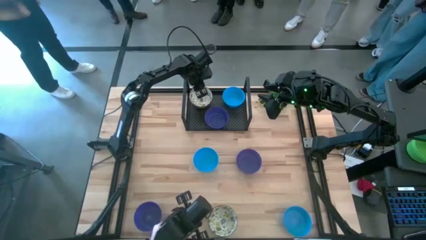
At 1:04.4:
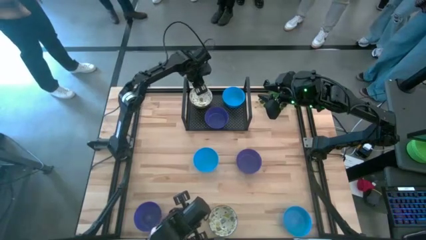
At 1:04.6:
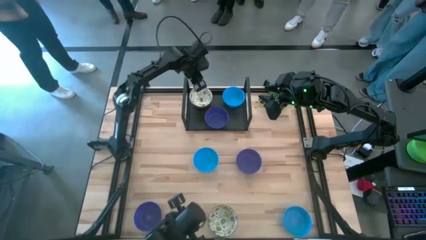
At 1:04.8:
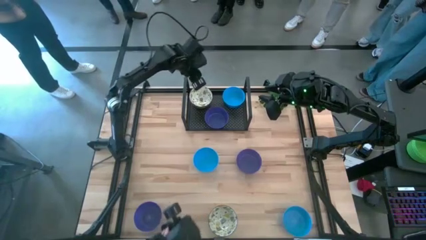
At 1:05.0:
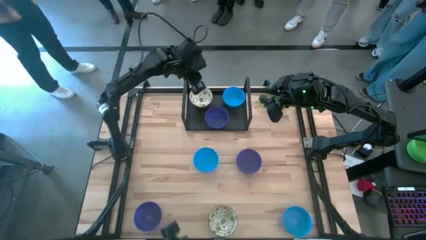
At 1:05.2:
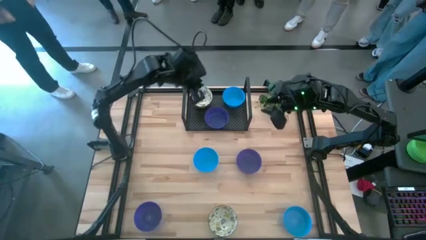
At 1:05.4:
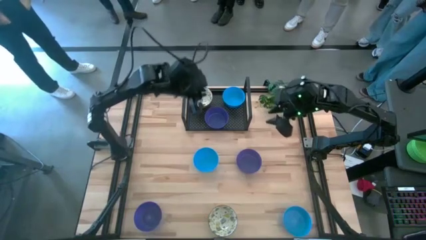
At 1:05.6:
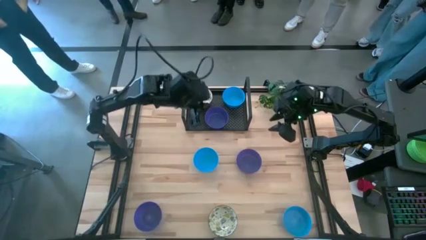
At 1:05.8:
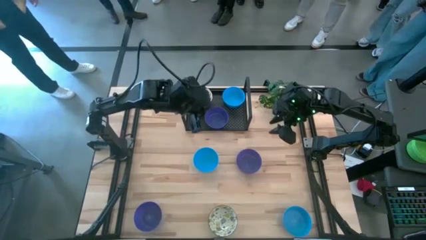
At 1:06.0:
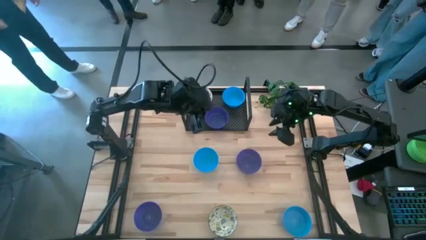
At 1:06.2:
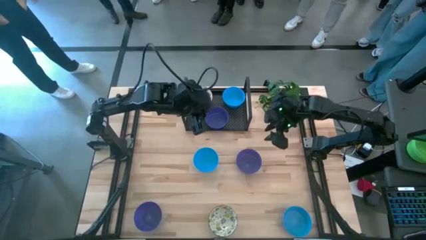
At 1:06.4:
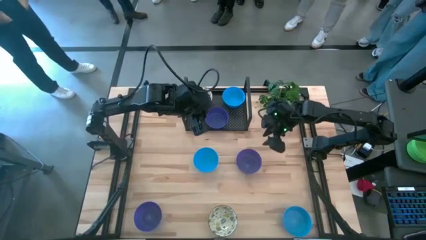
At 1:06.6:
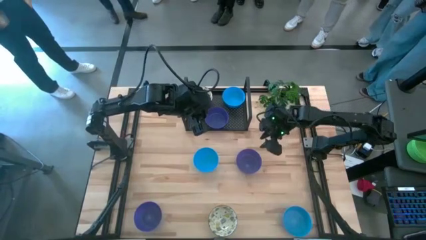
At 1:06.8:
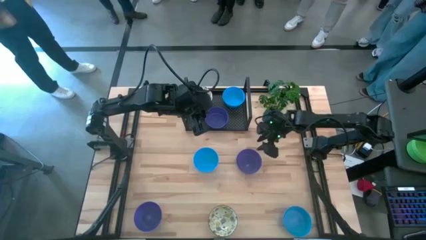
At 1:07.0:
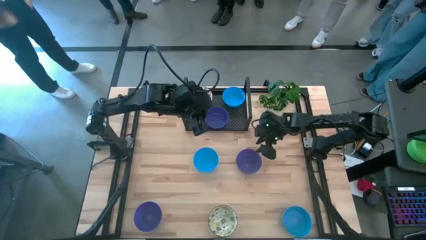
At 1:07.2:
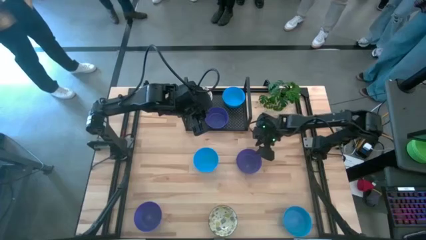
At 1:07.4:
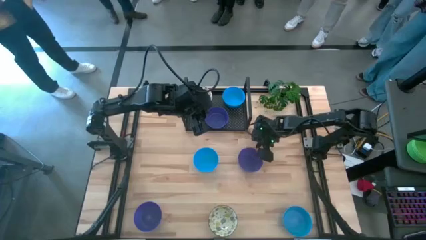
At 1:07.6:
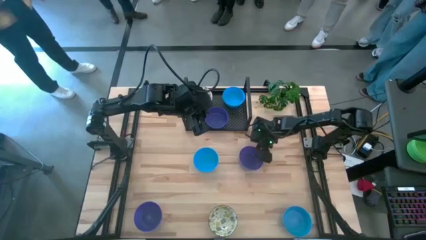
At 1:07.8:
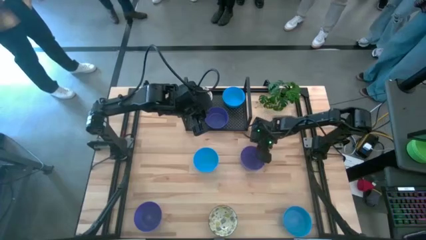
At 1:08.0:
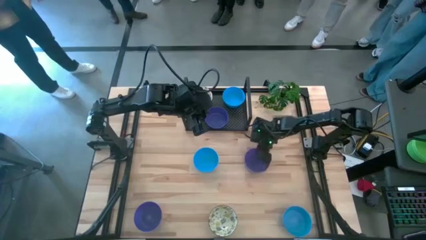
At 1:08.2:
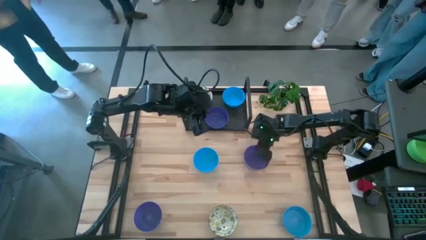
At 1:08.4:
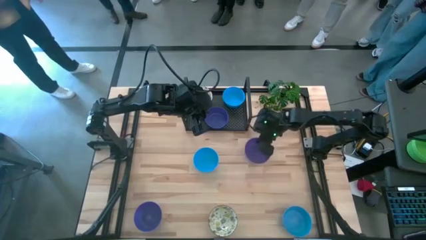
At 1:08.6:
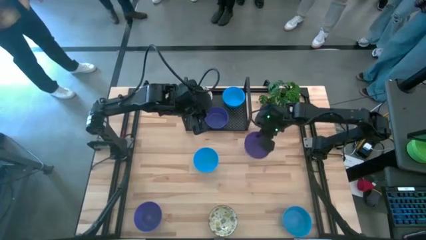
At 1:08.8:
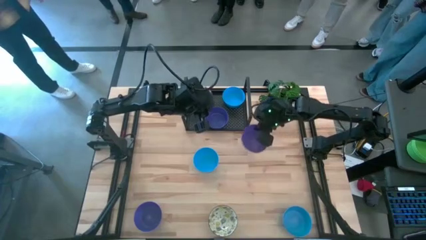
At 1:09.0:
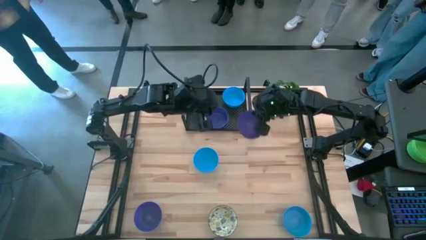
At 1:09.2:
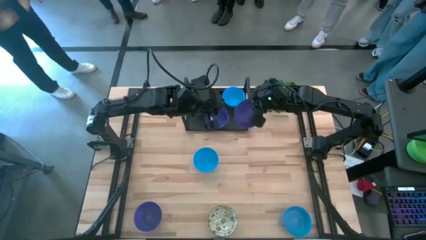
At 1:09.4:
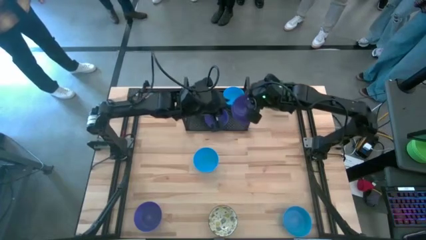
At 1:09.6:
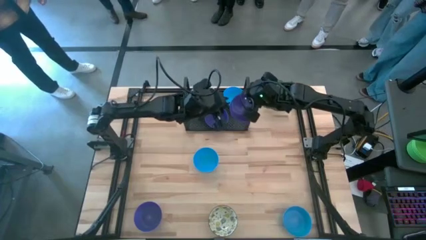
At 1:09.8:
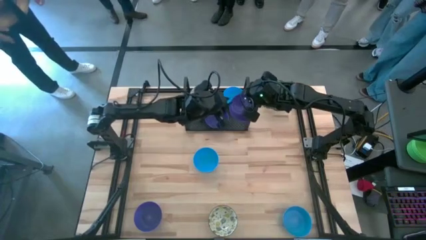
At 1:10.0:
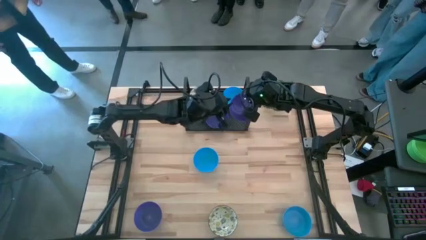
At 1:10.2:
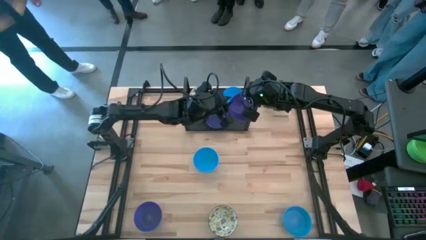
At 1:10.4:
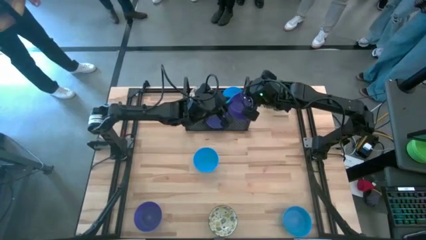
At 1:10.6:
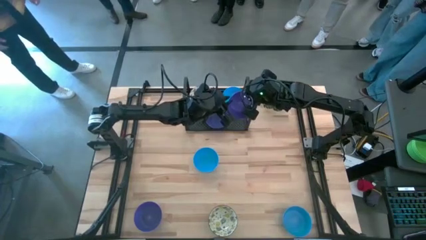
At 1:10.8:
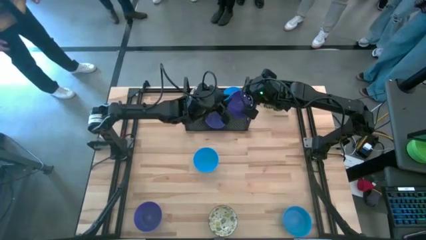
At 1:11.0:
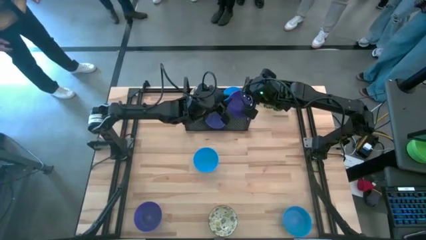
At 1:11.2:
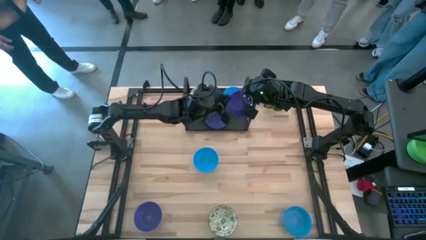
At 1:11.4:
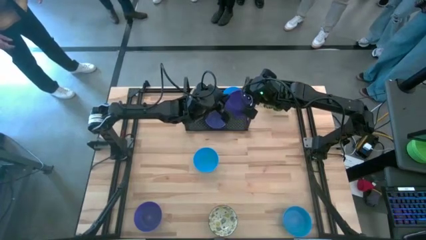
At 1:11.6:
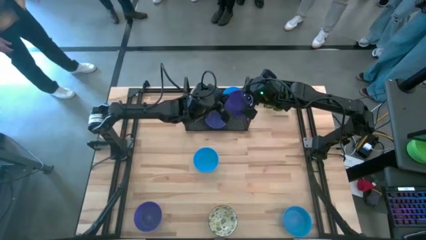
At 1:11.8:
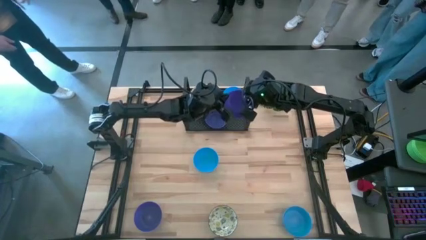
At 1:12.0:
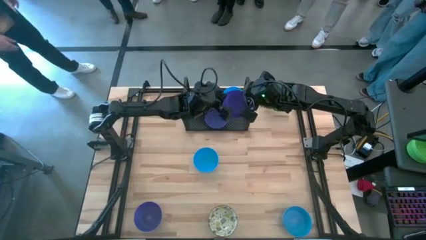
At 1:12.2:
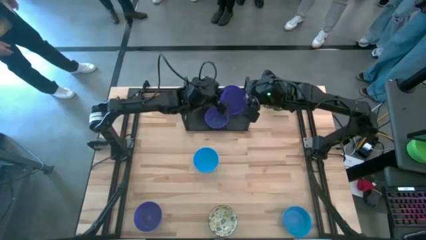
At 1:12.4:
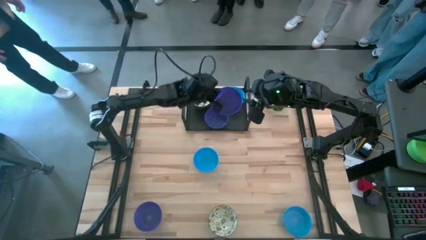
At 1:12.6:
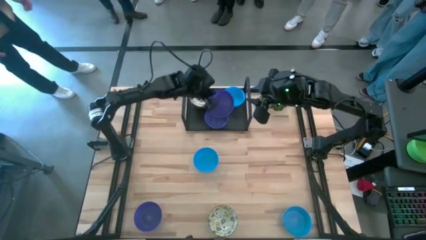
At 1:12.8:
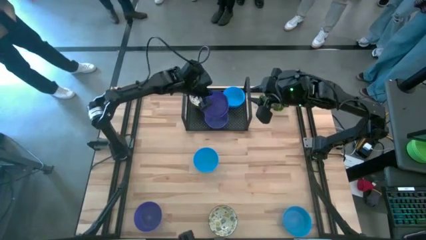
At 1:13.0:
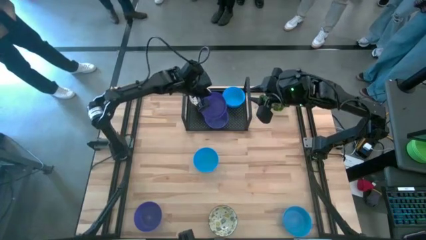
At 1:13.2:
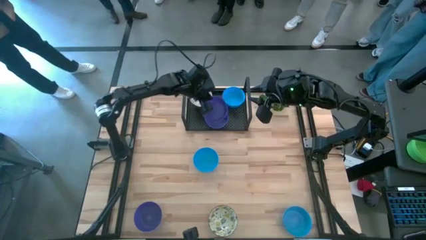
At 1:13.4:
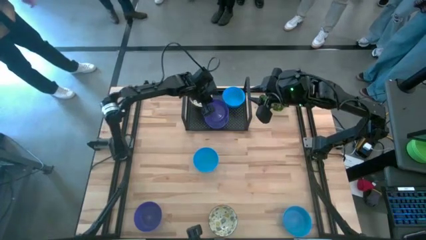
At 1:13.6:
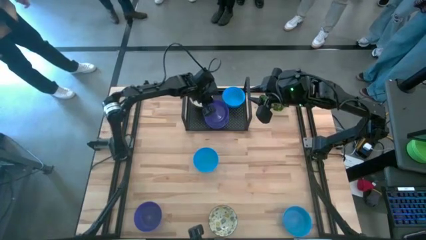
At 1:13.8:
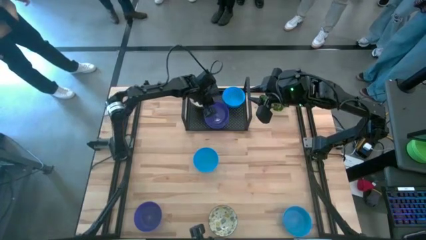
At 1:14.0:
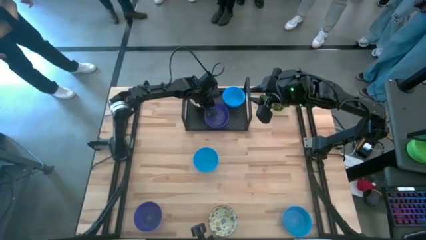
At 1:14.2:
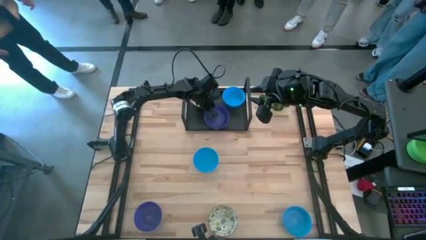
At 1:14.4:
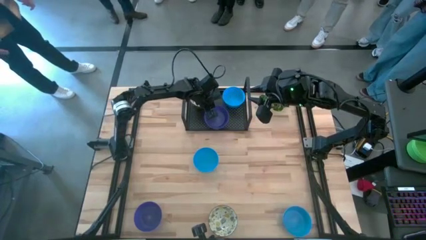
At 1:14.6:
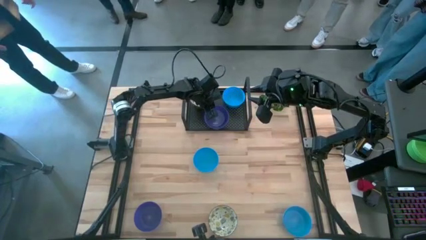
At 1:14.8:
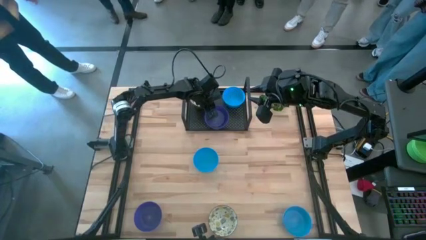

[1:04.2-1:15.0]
Task: Pick & Place Mini bowls
Stack the top purple bowl on top of the purple bowl on the shelf

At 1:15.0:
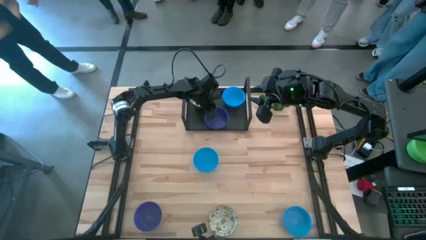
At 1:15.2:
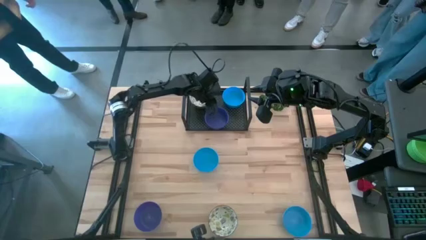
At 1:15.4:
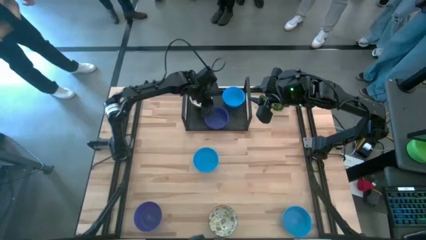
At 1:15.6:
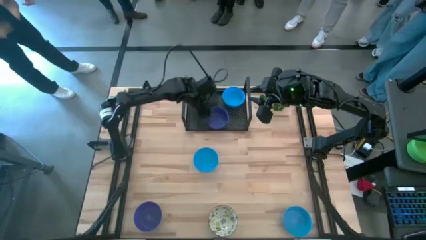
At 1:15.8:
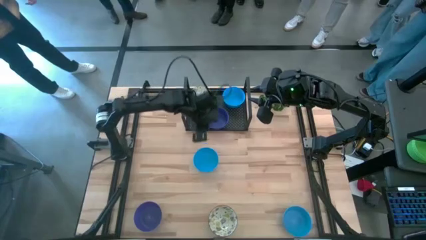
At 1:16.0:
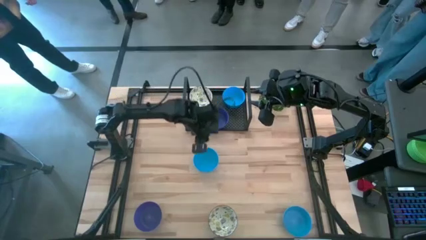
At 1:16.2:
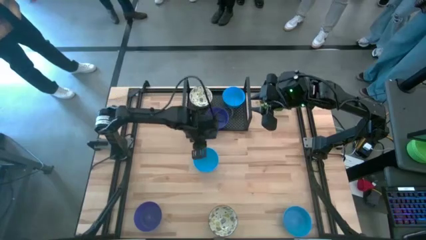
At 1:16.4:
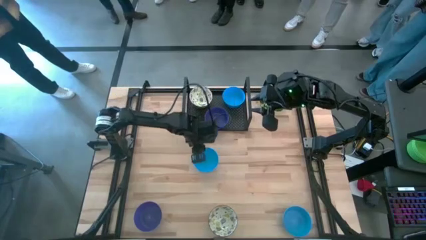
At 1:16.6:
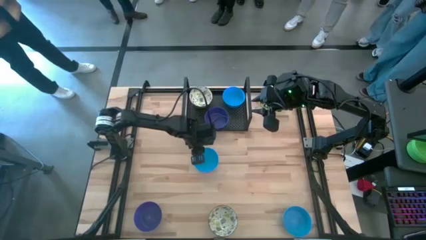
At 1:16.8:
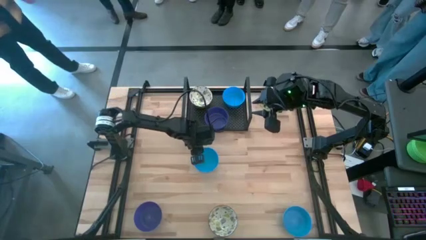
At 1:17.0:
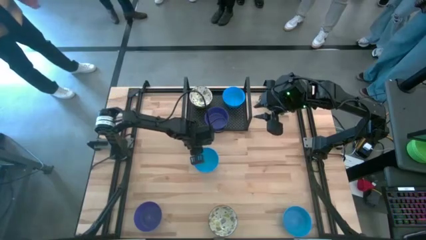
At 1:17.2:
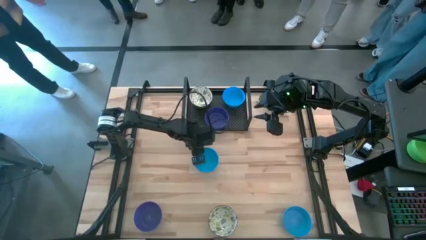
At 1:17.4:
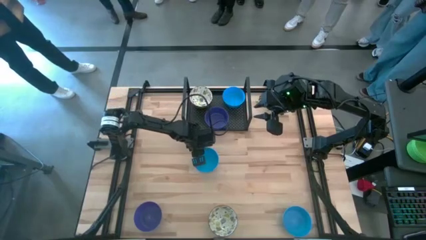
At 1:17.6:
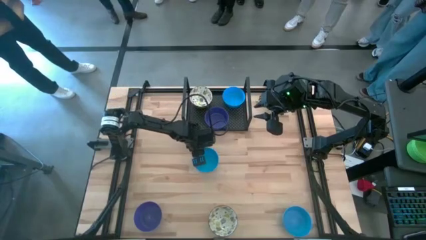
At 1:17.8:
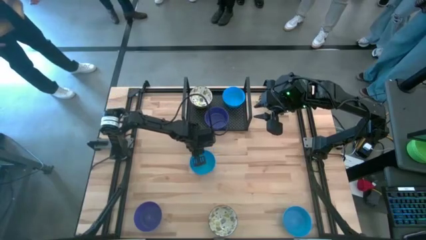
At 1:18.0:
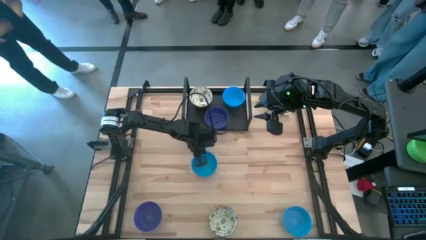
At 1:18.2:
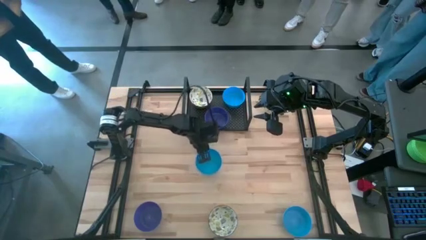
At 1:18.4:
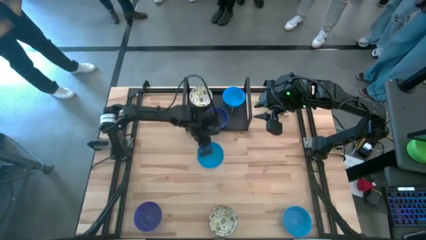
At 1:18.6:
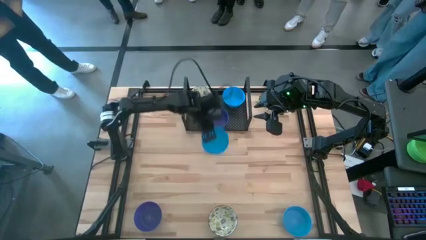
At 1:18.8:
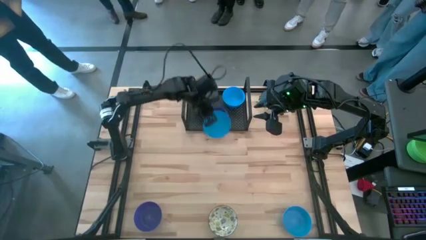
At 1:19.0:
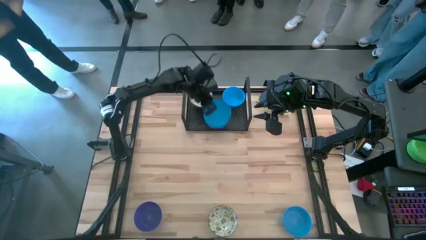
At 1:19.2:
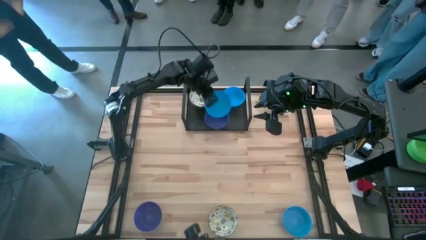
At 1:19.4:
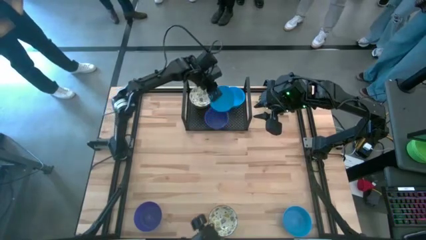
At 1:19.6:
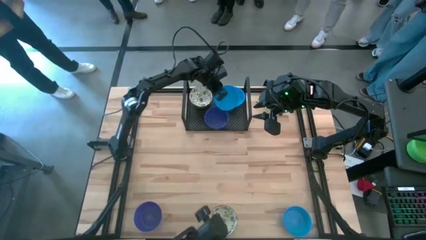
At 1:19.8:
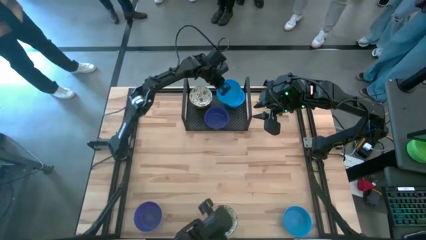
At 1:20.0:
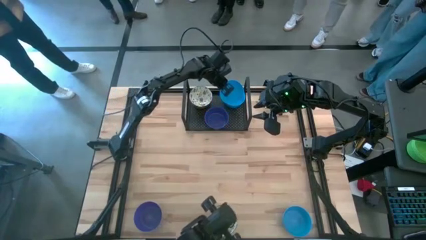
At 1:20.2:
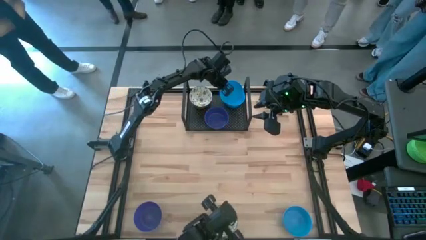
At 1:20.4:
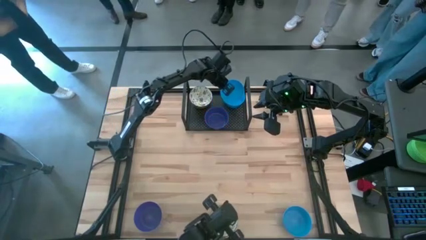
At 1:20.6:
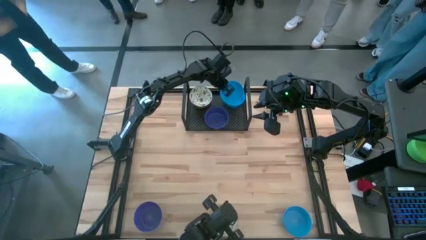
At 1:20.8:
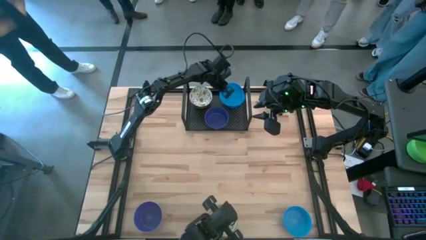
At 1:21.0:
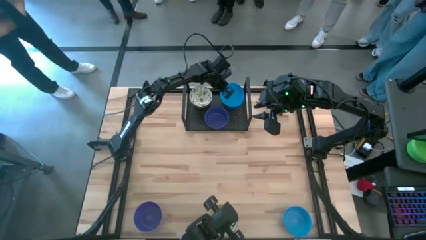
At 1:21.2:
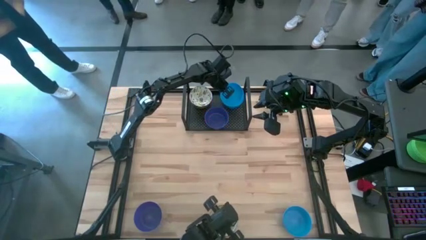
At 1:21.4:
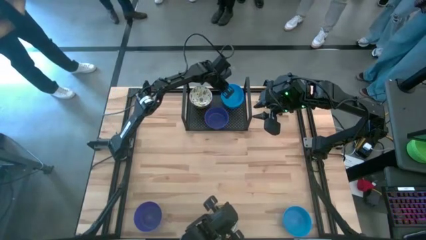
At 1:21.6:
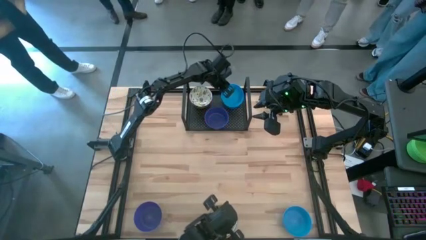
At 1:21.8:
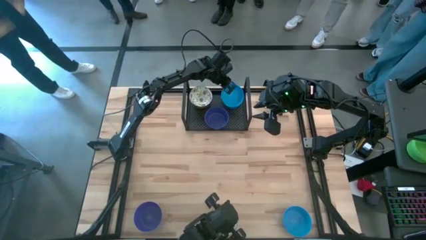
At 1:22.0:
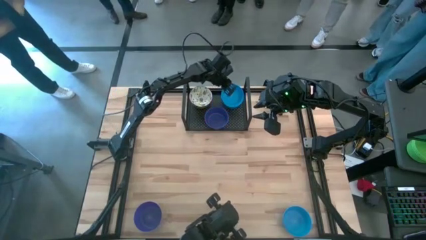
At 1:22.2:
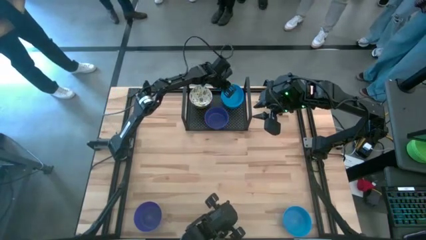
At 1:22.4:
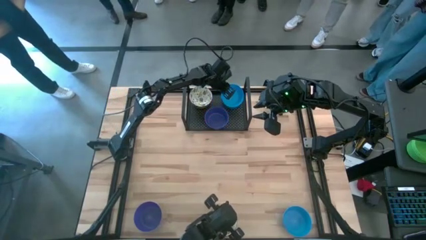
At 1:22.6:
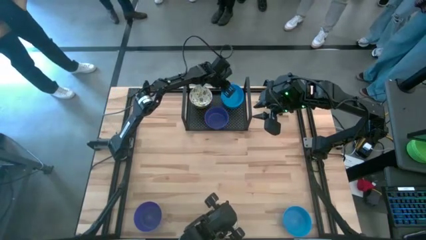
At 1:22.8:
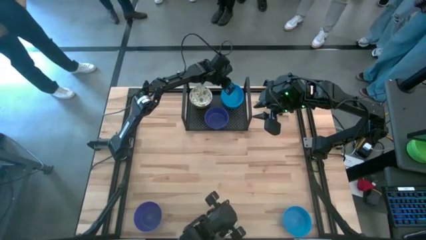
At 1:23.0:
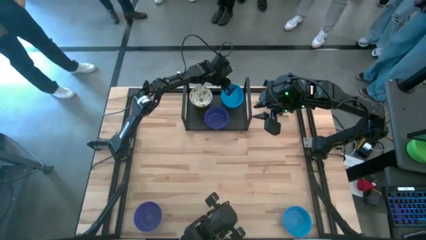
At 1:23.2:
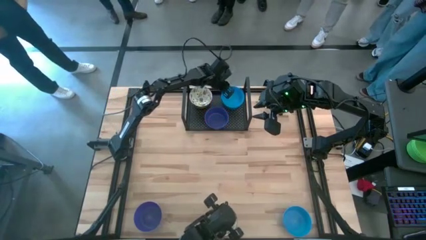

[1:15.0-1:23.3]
Stack the top blue bowl on top of the blue bowl on the shelf
